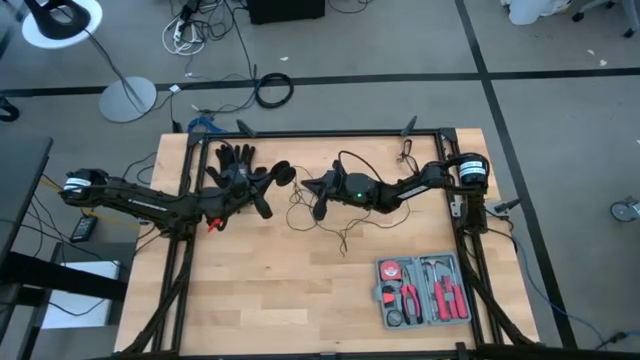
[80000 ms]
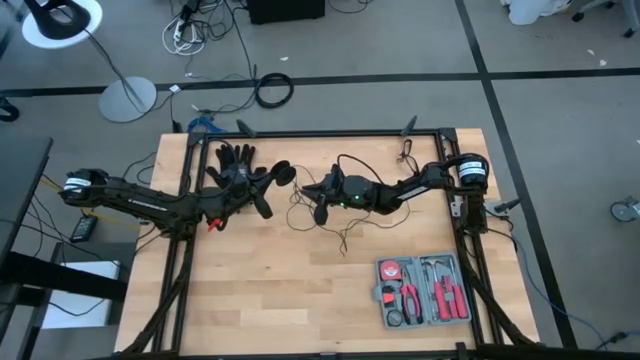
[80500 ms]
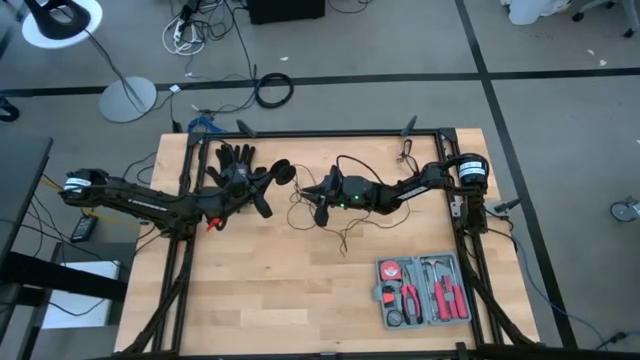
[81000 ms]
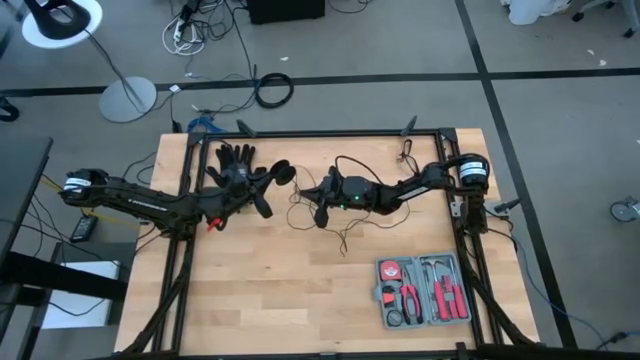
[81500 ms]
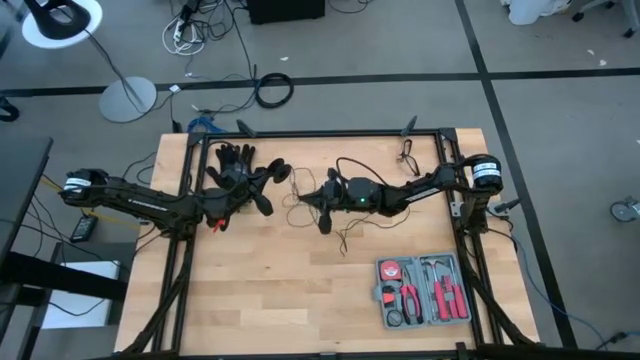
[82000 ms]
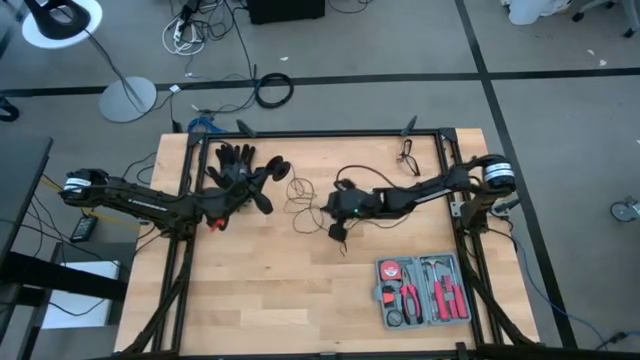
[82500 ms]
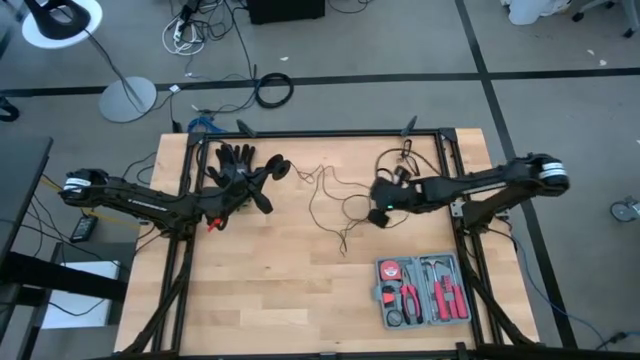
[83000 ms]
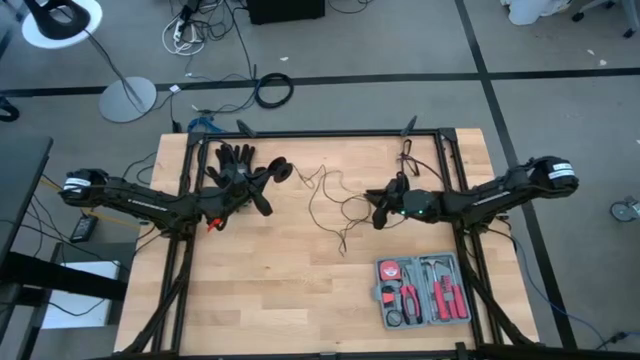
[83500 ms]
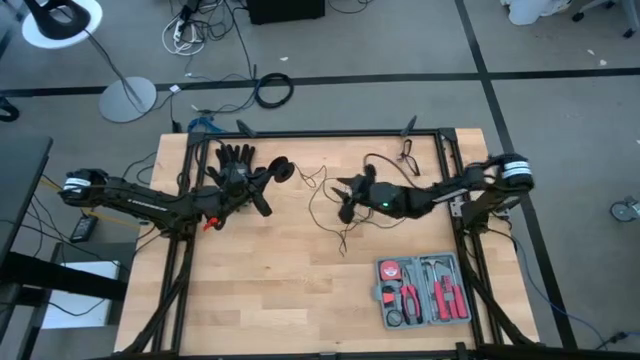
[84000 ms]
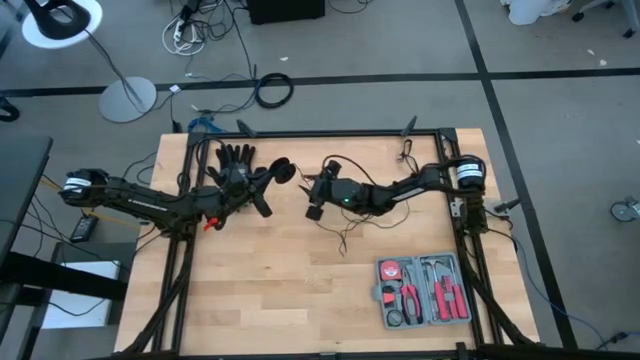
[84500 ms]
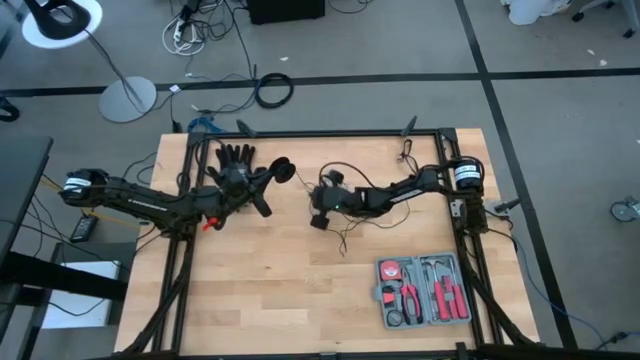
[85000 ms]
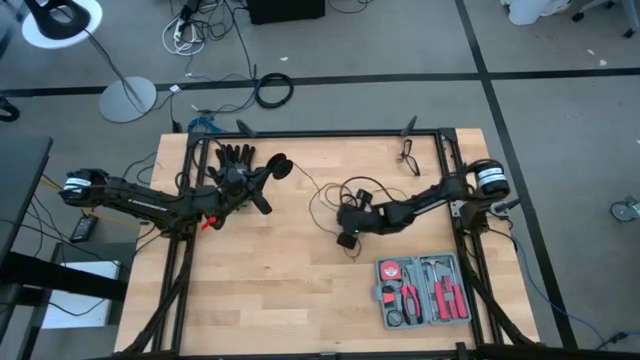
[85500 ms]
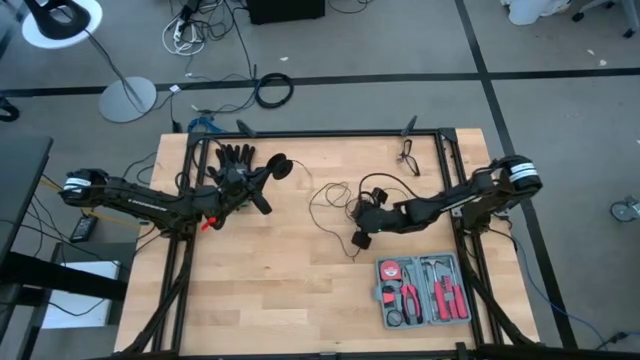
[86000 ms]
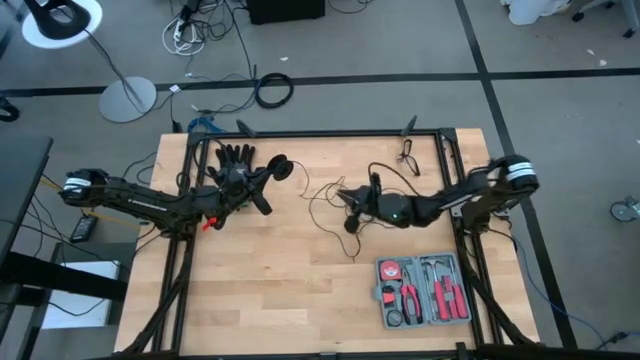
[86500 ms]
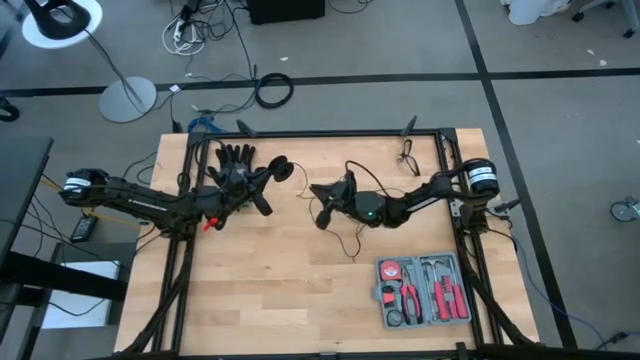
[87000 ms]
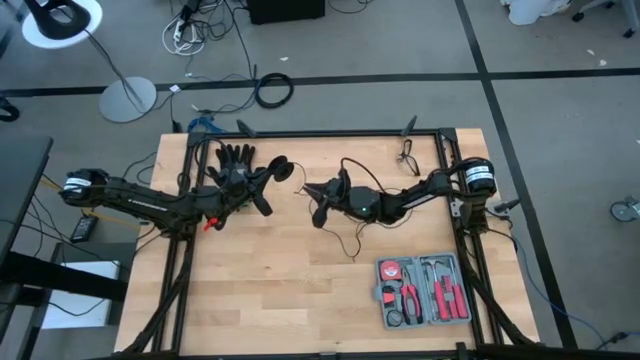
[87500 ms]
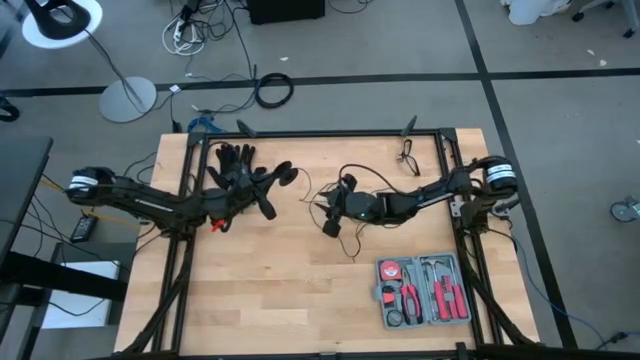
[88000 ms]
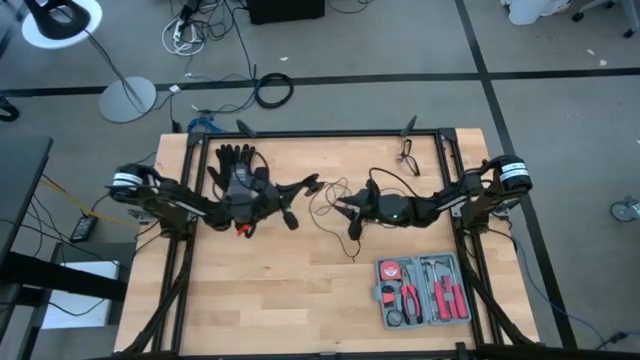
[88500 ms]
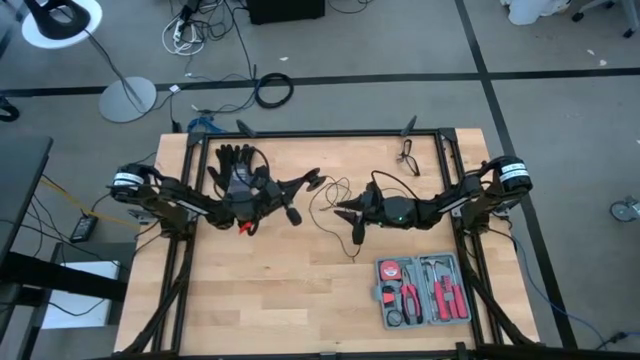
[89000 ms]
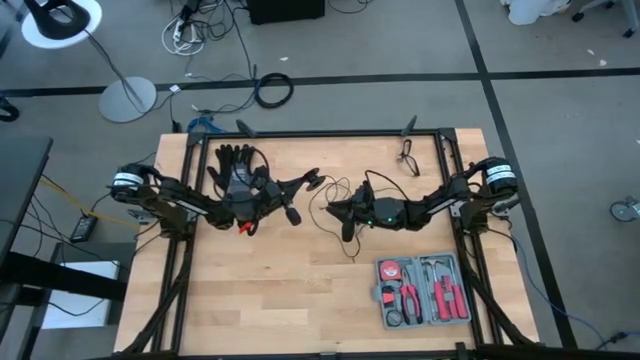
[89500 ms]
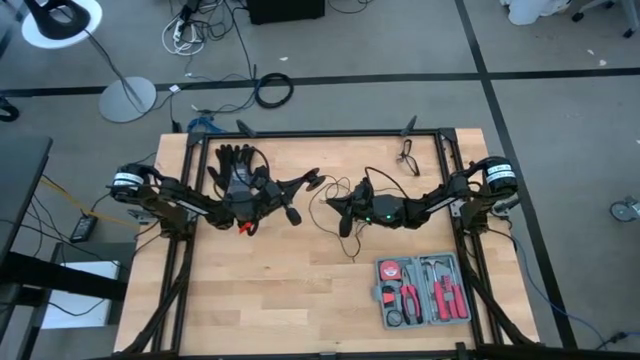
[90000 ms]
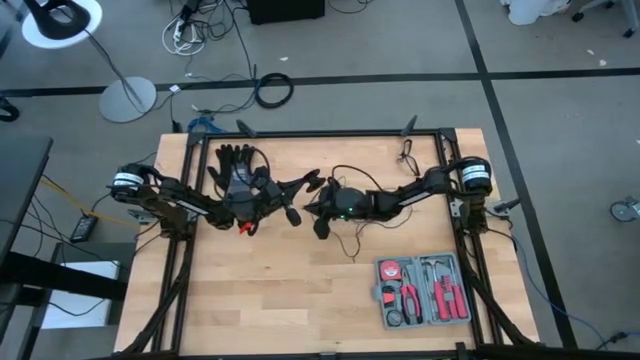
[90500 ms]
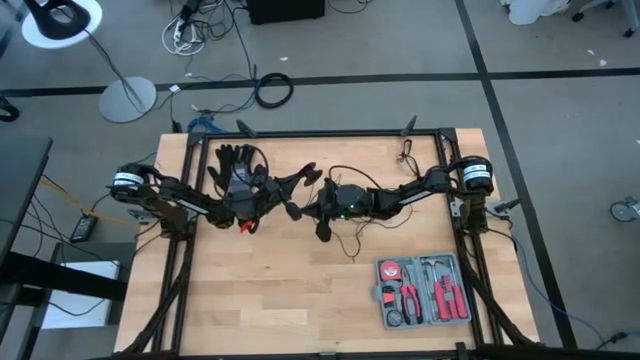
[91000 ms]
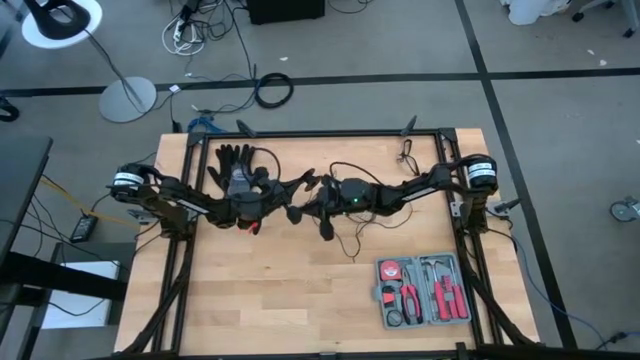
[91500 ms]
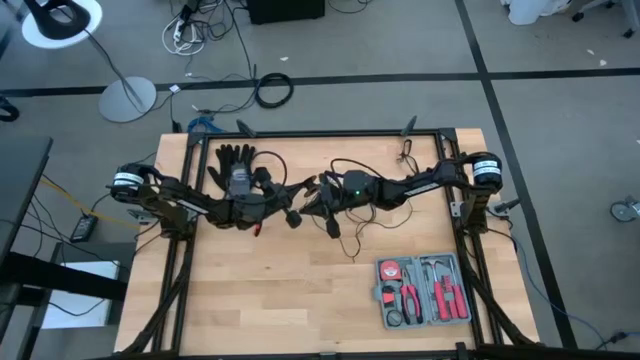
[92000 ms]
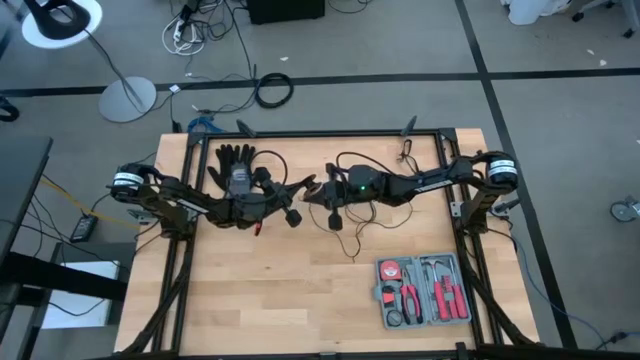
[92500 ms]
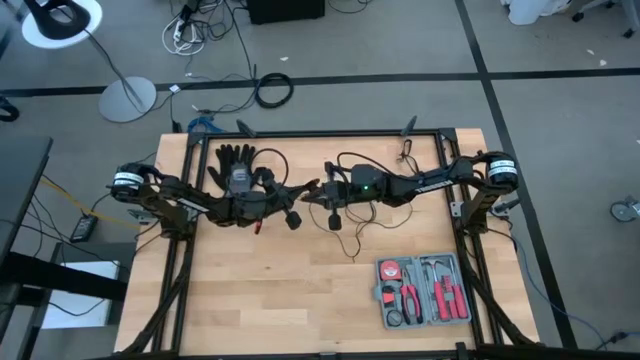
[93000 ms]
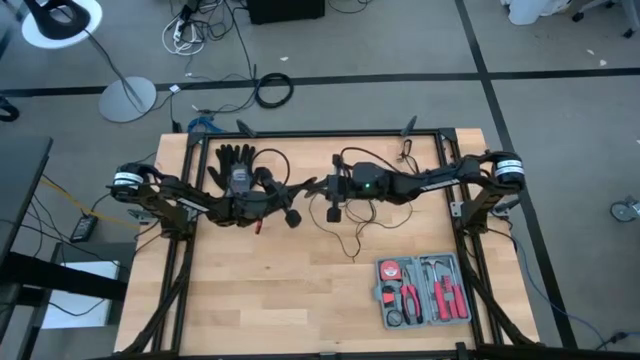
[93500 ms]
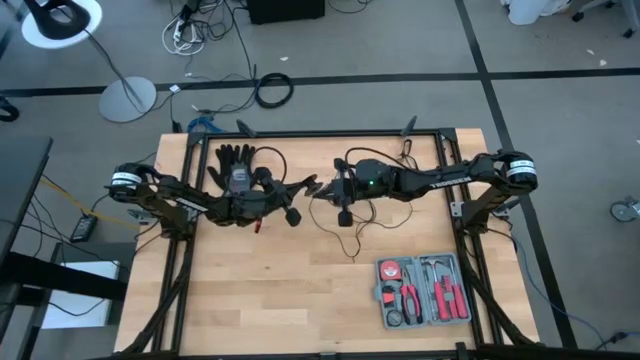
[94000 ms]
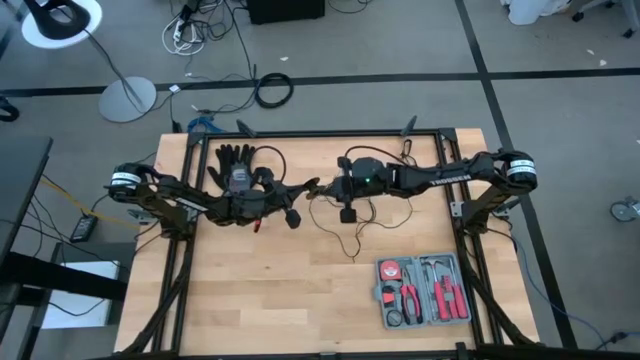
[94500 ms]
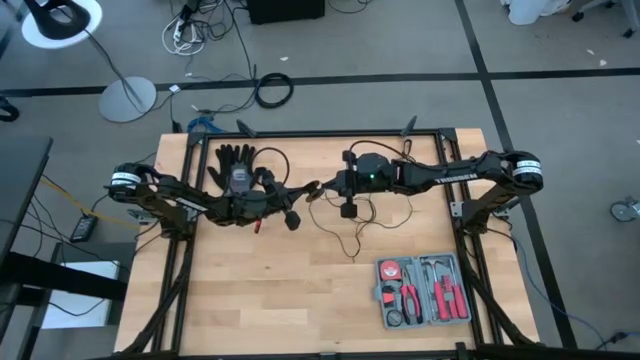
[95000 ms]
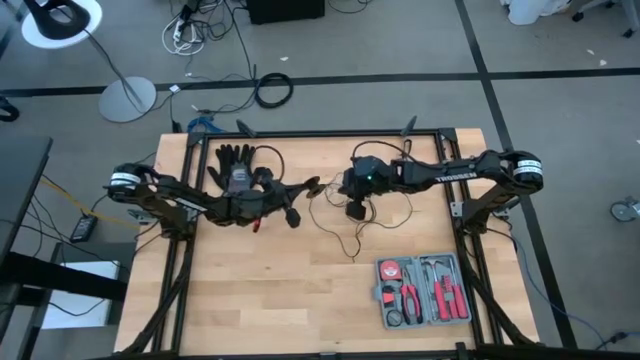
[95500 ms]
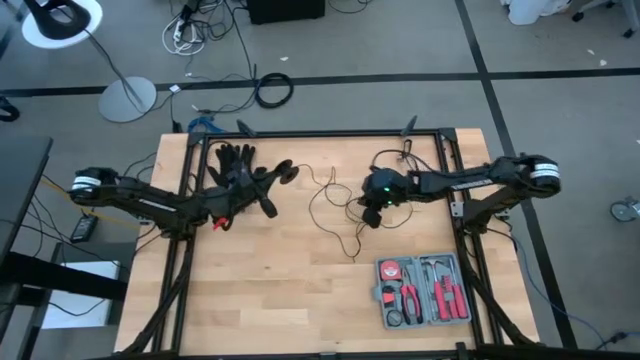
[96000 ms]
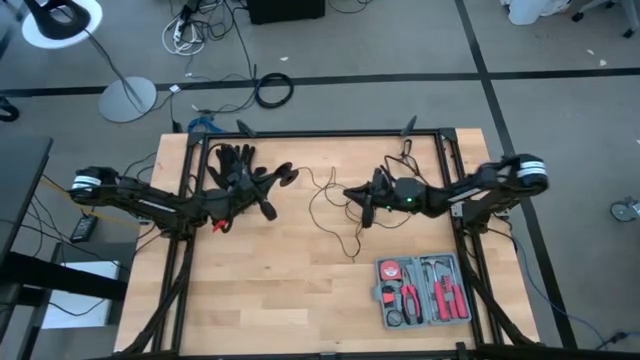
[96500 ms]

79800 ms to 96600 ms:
Task: Coil cords
Coil the black wire

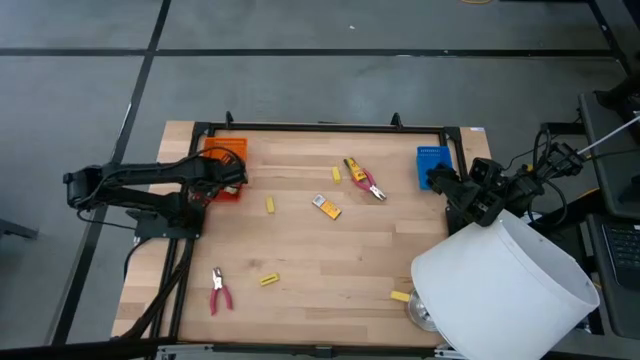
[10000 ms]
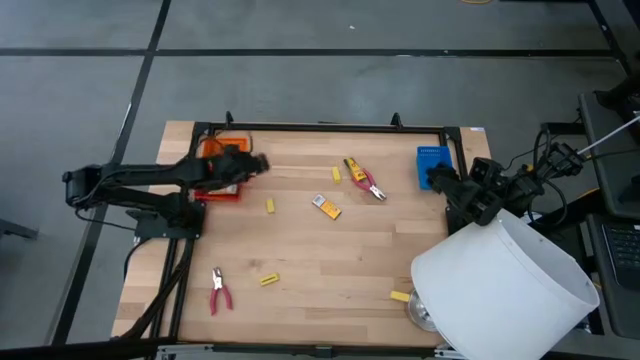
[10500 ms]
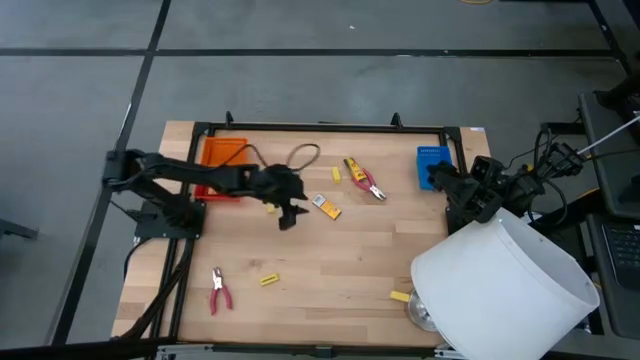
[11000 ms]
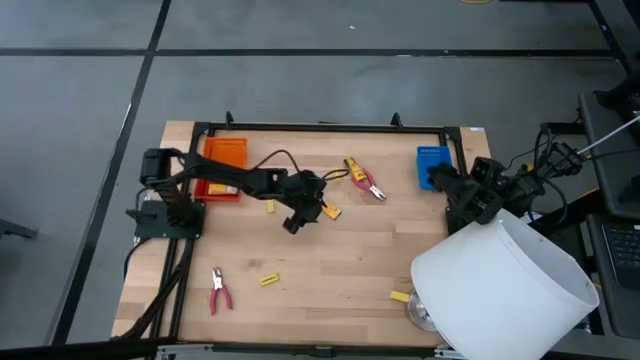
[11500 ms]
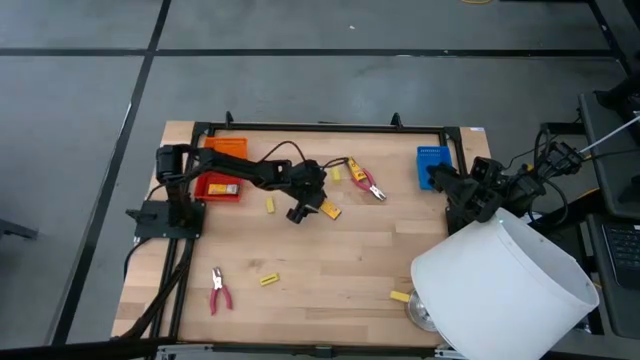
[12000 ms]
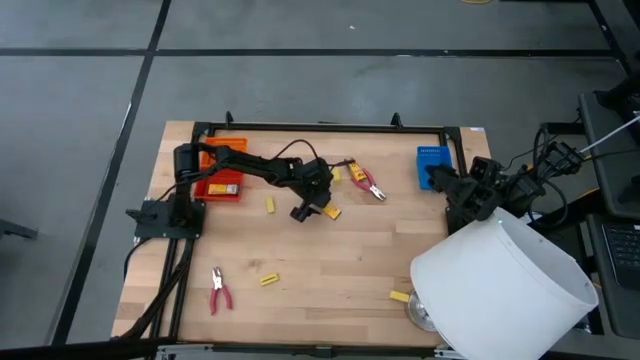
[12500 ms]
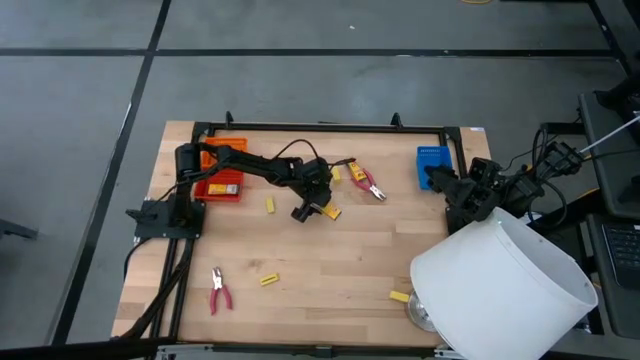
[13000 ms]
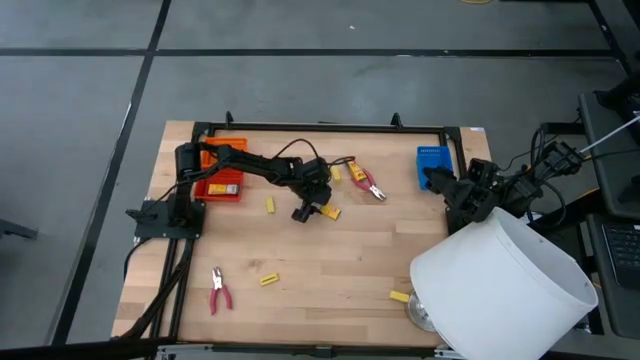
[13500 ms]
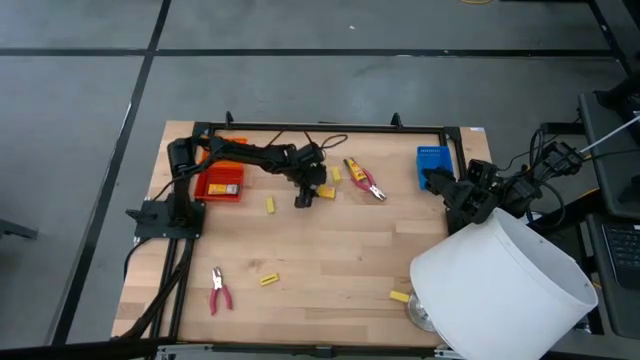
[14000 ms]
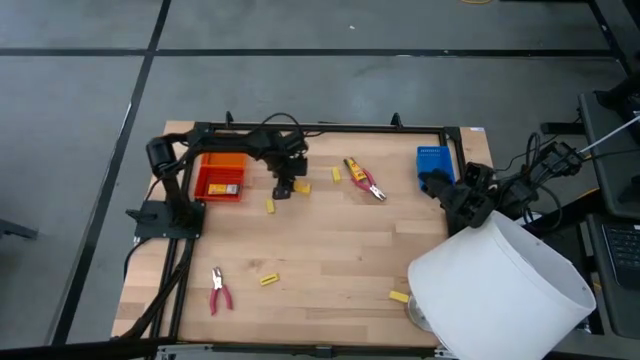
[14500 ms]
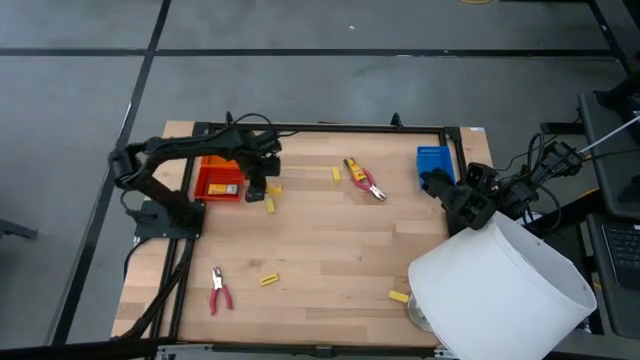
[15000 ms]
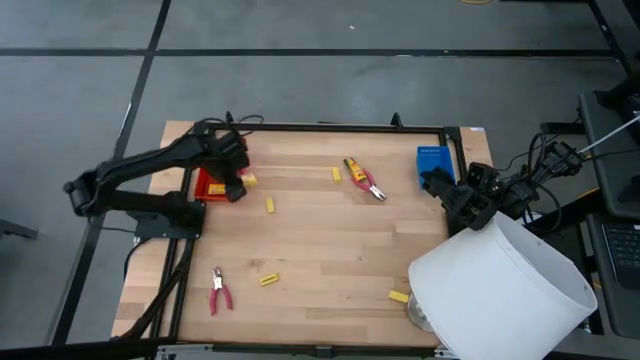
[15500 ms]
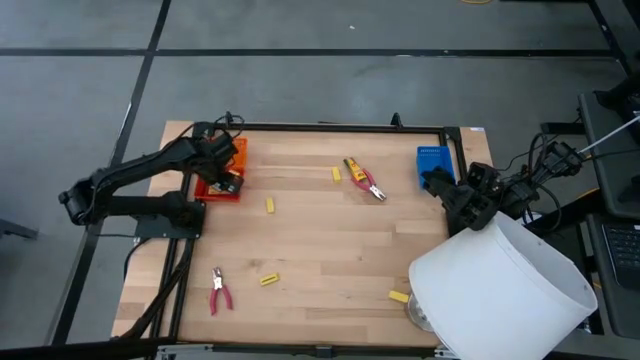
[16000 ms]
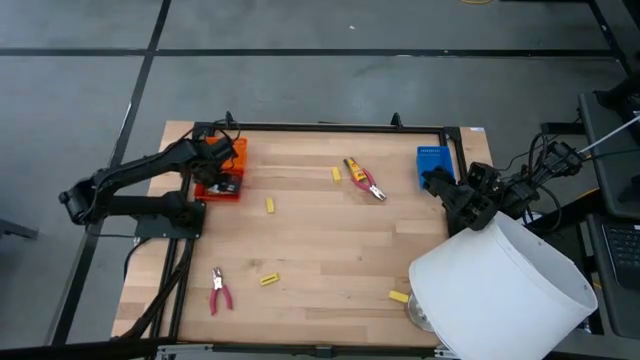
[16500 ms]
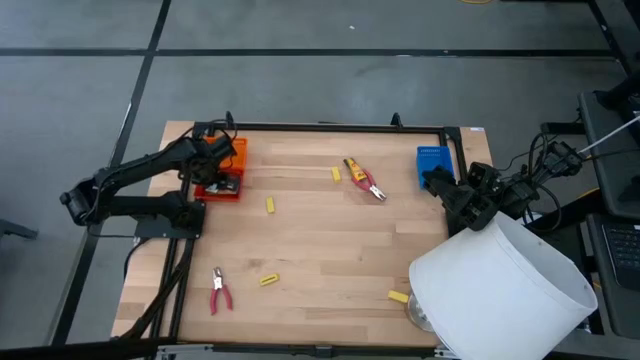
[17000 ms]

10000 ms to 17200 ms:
Task: Pick & Place School Supplies
Put the bottom yellow crayon box into the red bin
